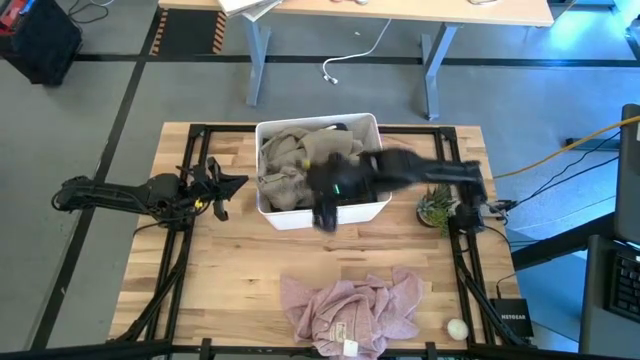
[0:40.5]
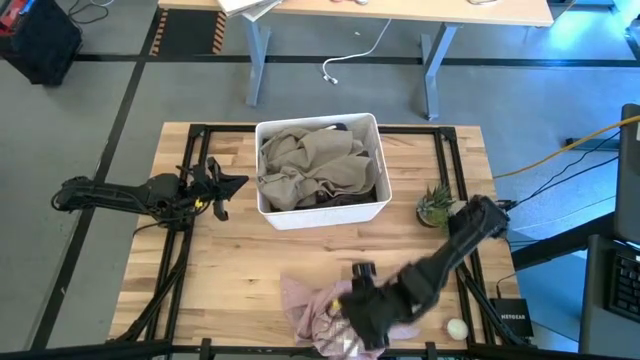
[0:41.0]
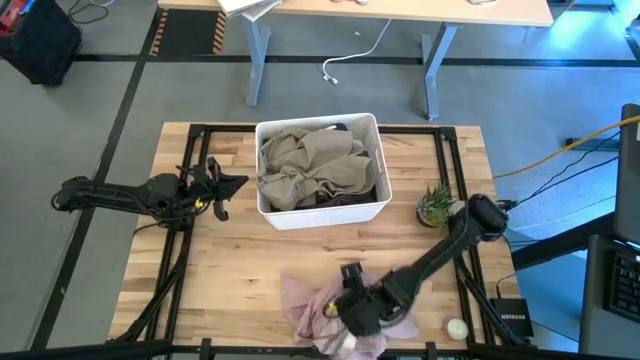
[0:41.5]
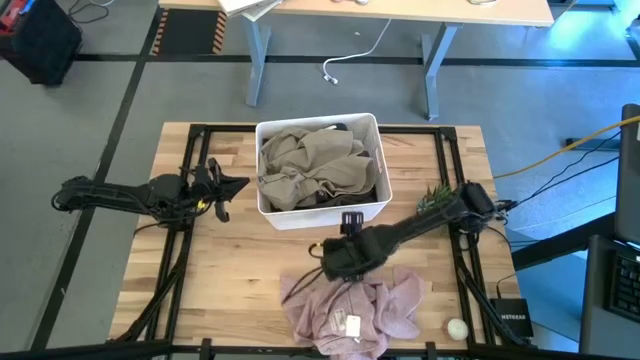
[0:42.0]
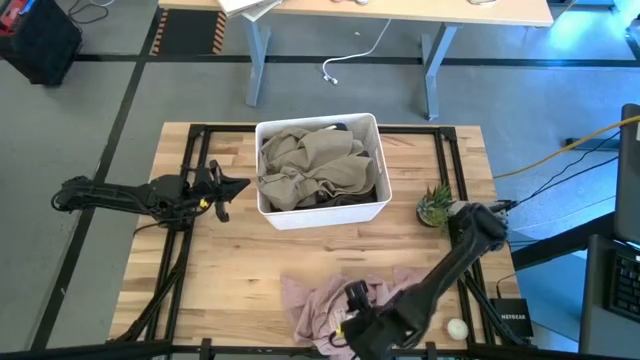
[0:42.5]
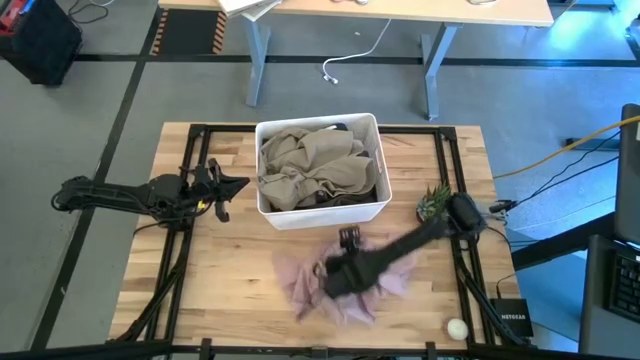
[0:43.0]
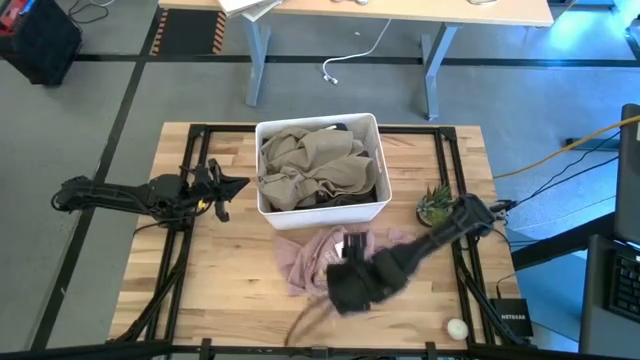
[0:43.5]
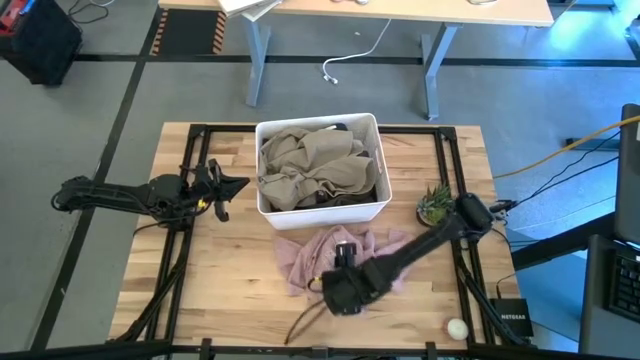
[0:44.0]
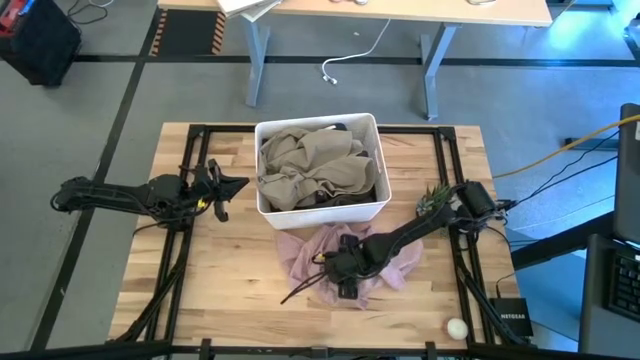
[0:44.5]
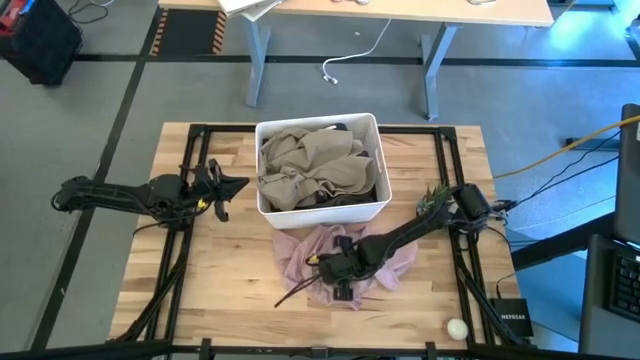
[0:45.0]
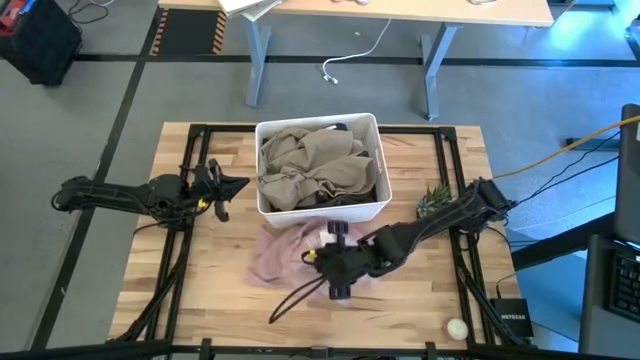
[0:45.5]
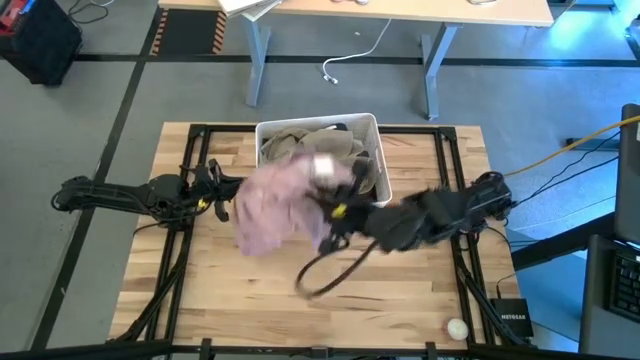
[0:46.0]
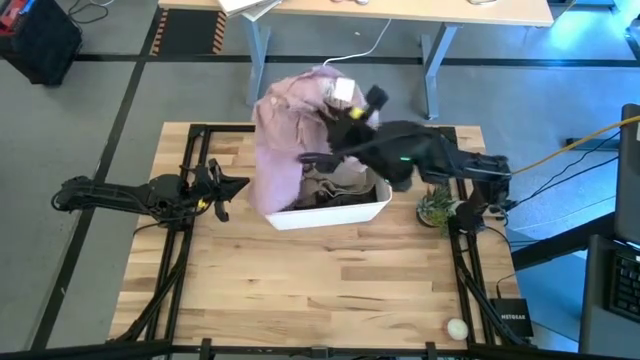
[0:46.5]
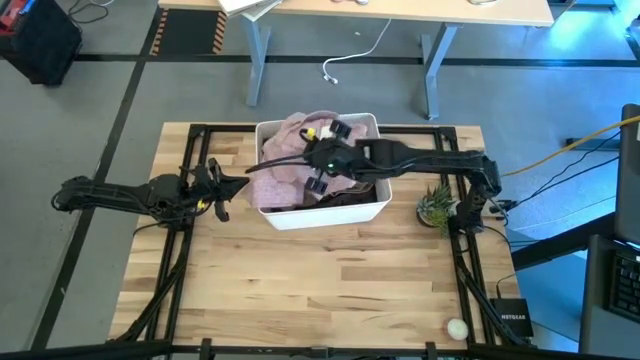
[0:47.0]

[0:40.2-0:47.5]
Task: Sort clothes
Put the pink polo into the laundry bin

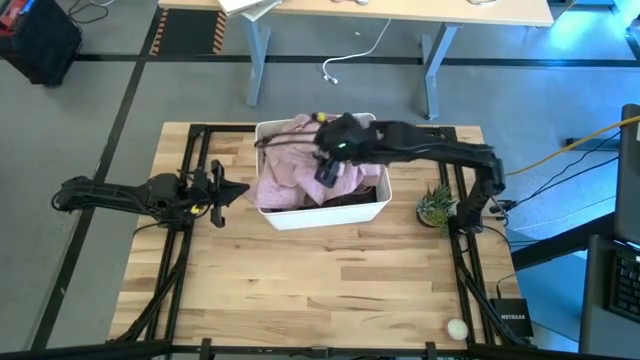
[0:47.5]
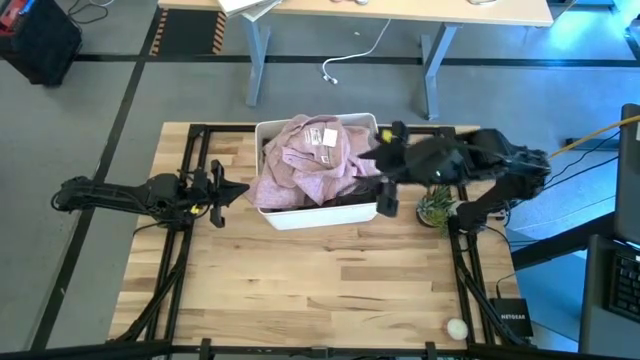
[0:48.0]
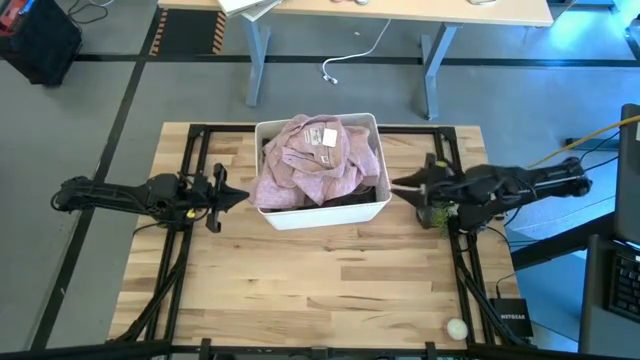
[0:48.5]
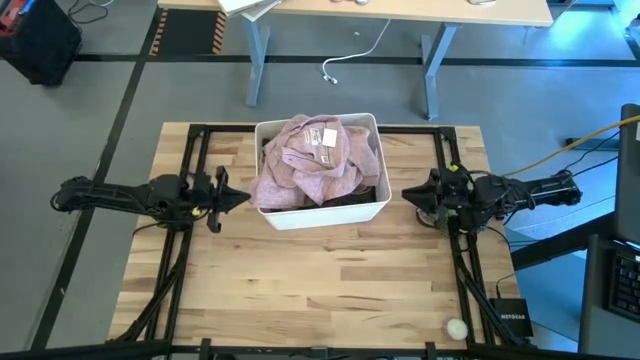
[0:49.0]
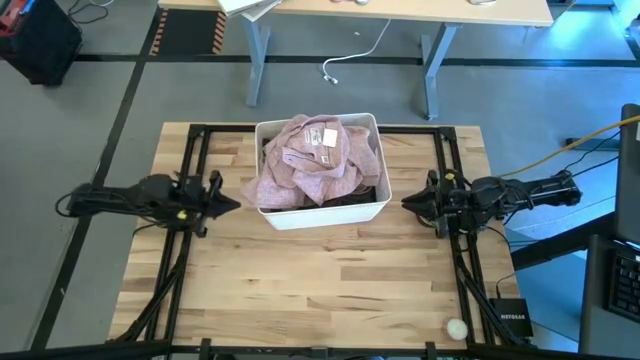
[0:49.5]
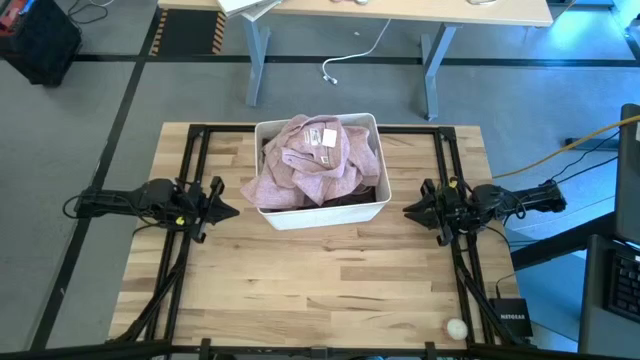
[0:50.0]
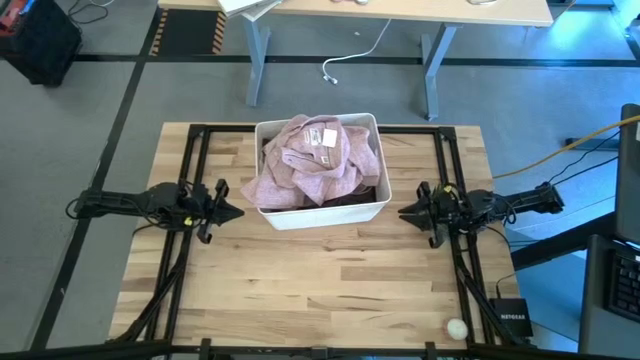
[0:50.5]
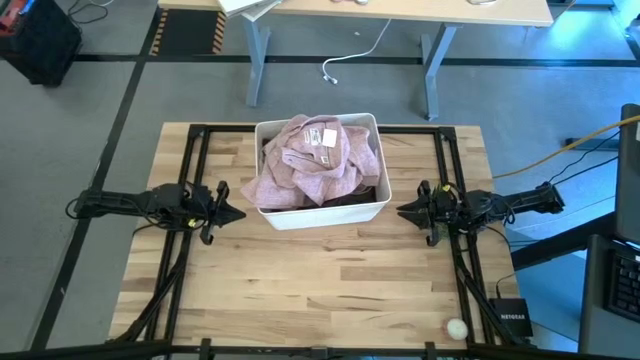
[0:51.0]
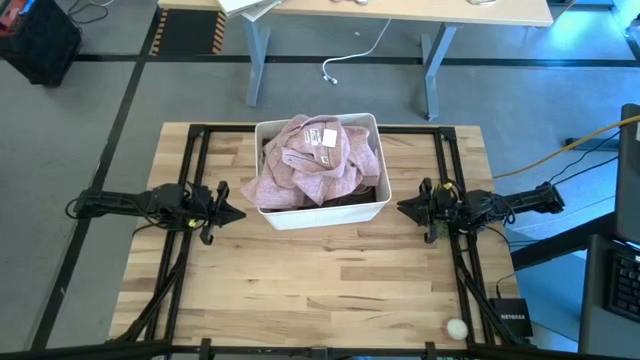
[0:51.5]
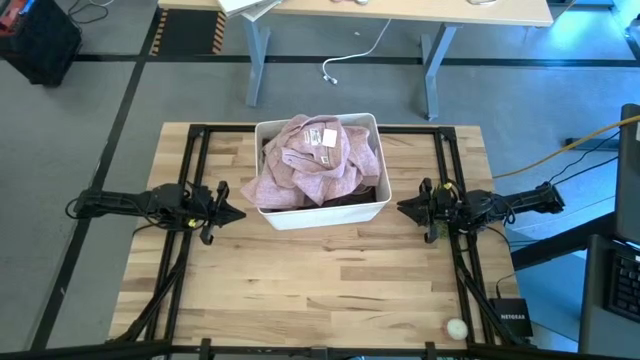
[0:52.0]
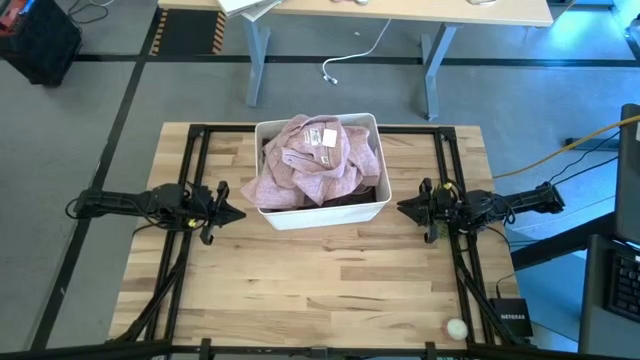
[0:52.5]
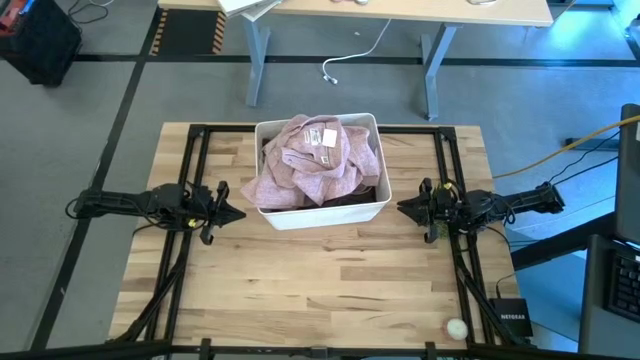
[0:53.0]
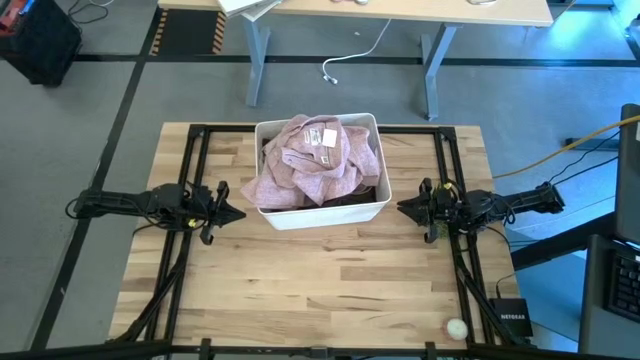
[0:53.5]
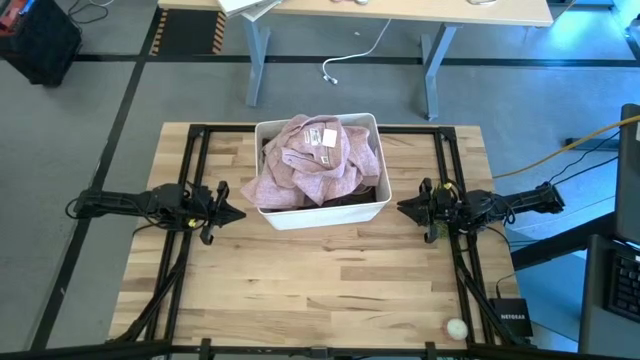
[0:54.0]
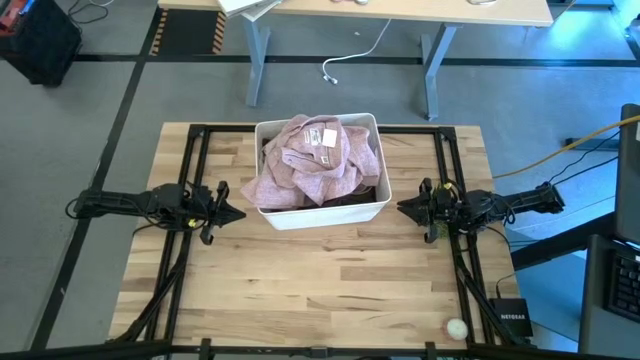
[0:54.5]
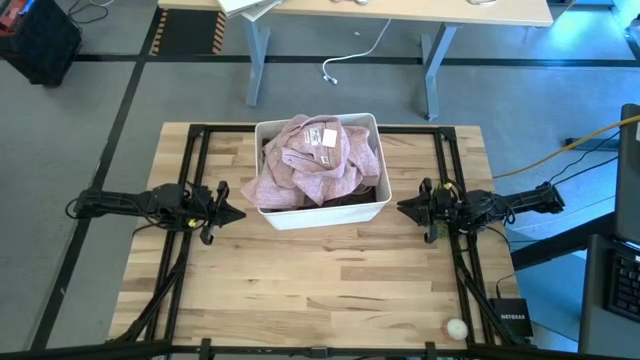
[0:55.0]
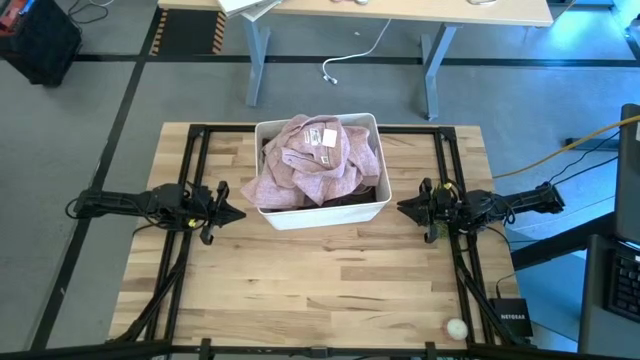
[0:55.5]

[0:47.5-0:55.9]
Return to Home Position

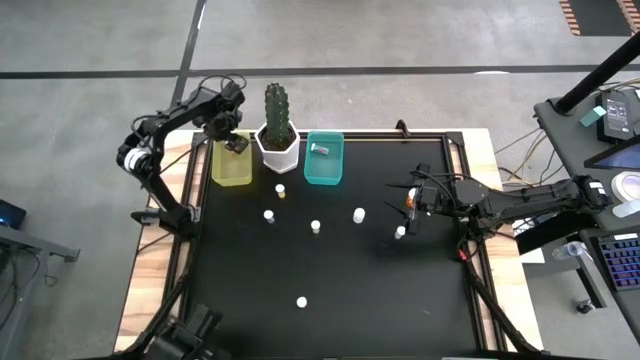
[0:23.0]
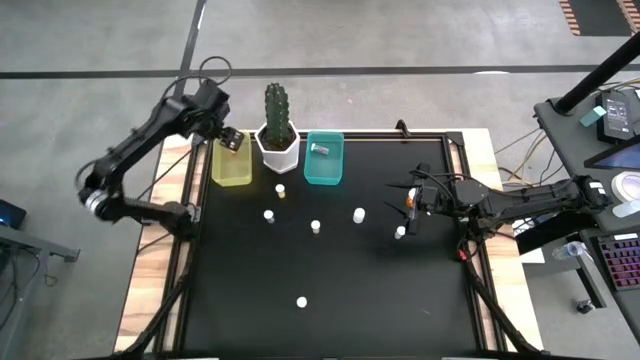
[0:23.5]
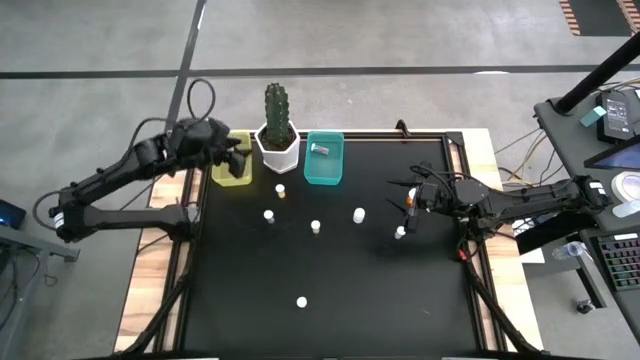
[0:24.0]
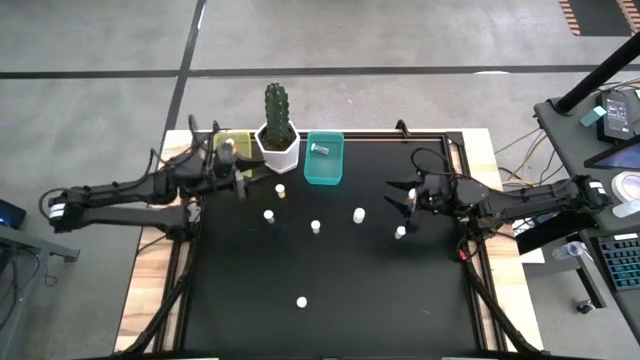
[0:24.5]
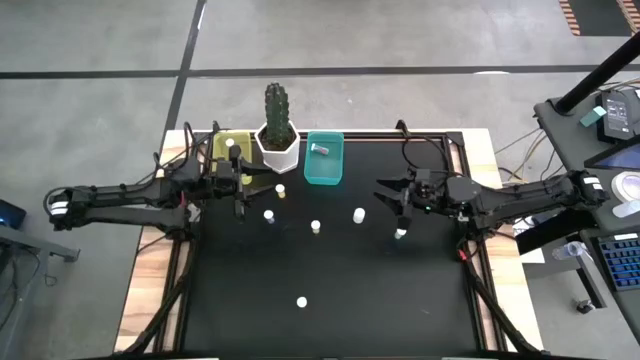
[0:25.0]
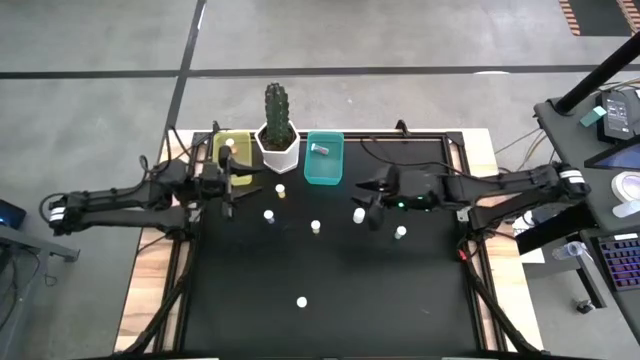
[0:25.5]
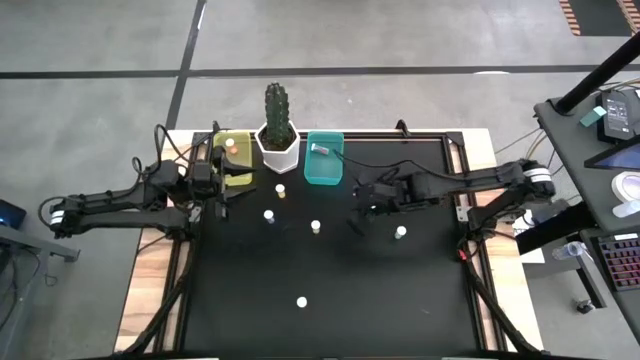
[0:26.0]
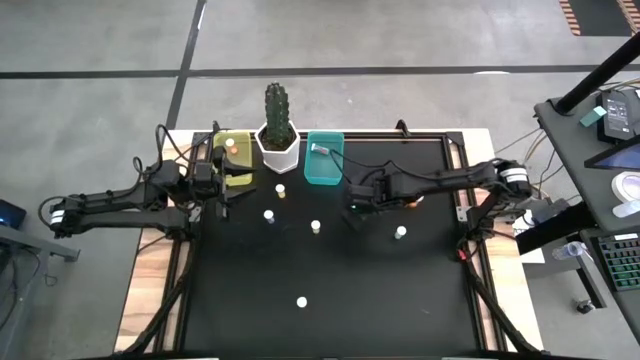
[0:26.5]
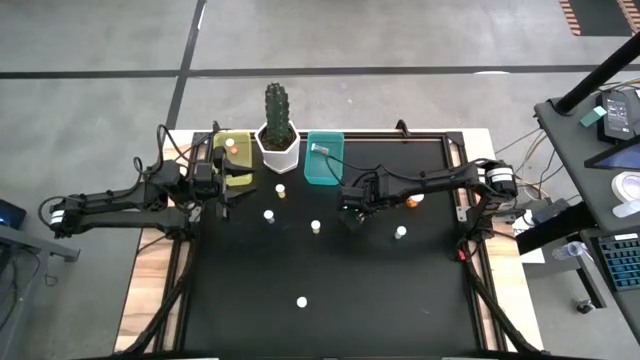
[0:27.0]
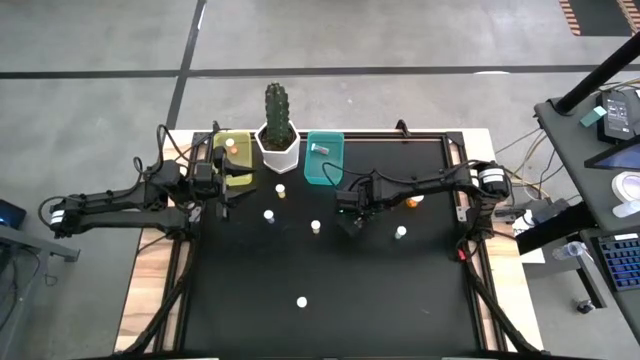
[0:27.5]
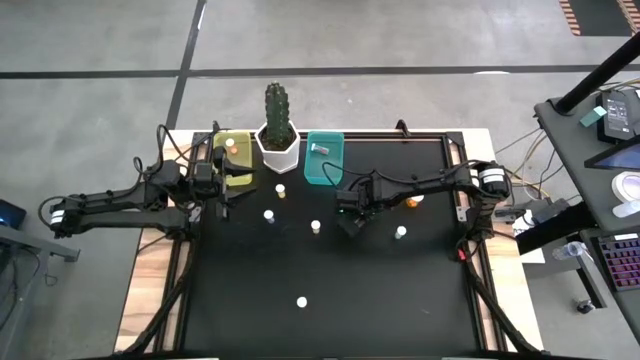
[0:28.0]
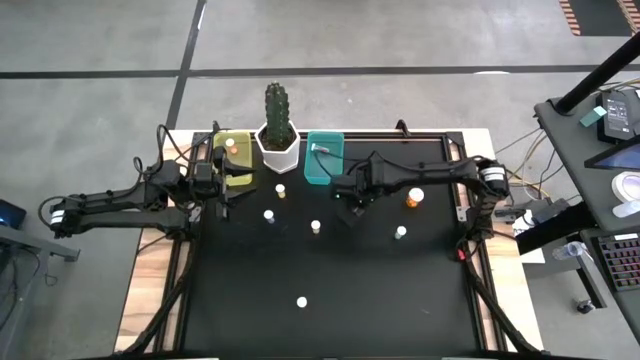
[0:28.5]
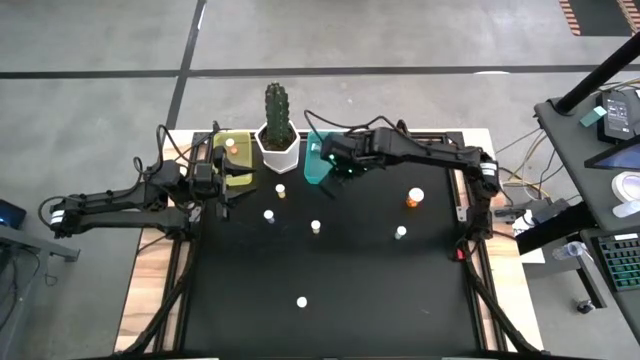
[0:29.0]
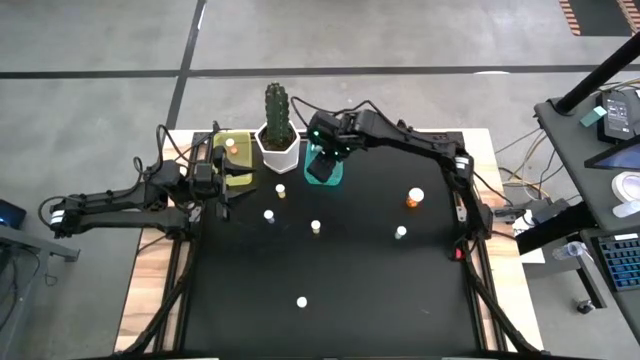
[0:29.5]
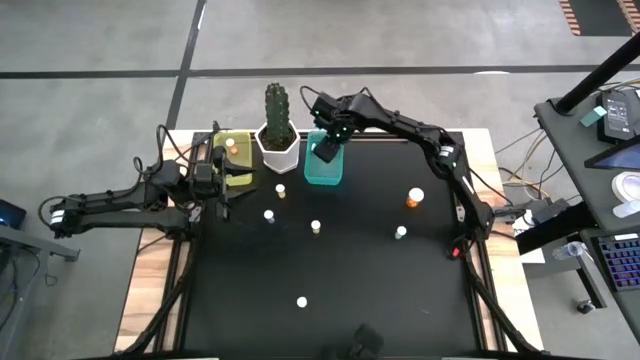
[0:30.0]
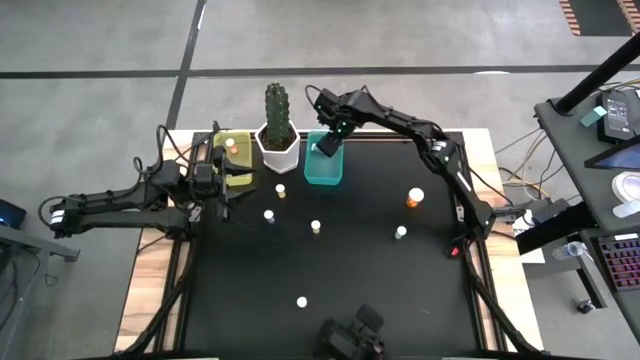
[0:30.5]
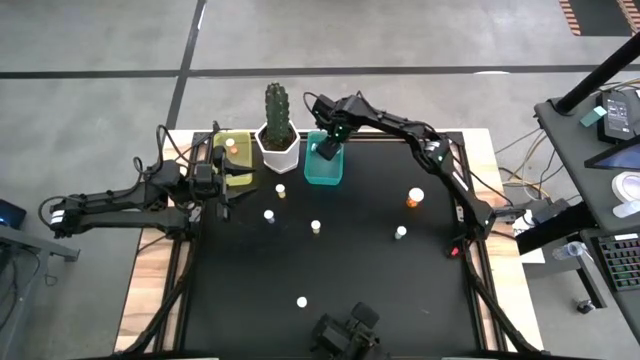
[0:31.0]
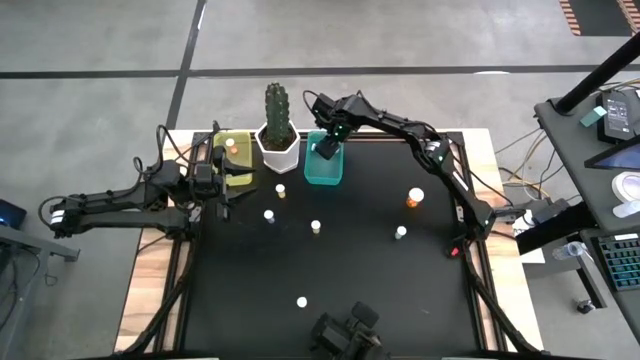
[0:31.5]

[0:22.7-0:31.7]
Task: Pick and place medicine bottles into bin by pill shape (circle, oval)
Put the transparent white capsule bottle into the blue
